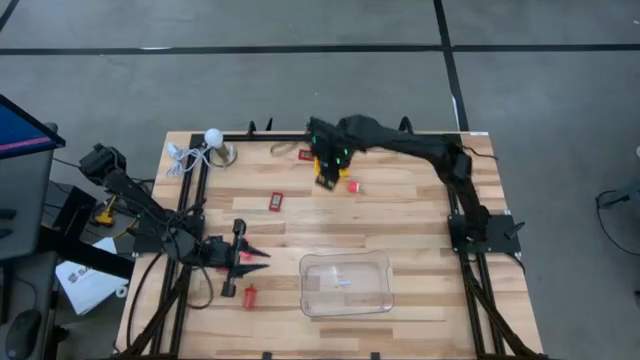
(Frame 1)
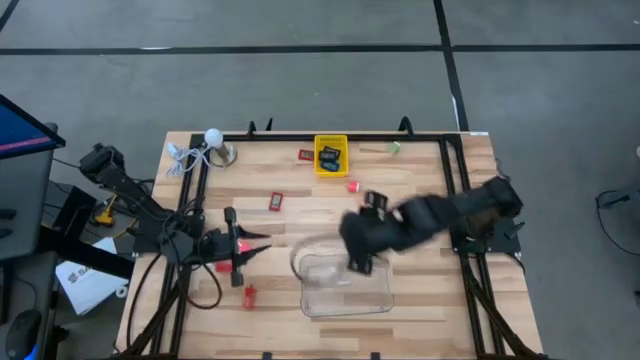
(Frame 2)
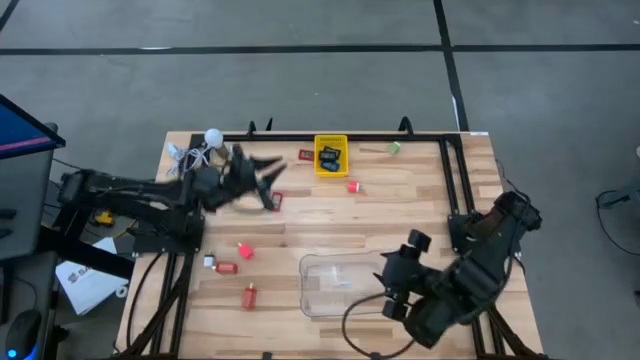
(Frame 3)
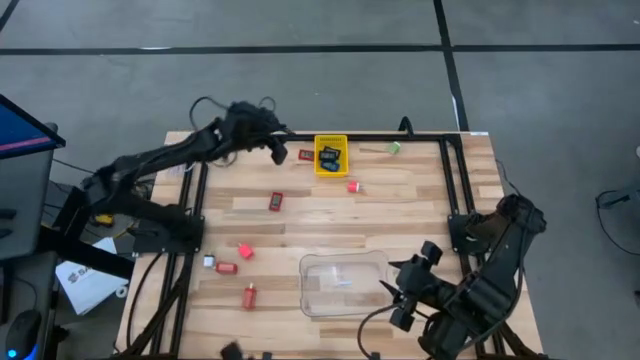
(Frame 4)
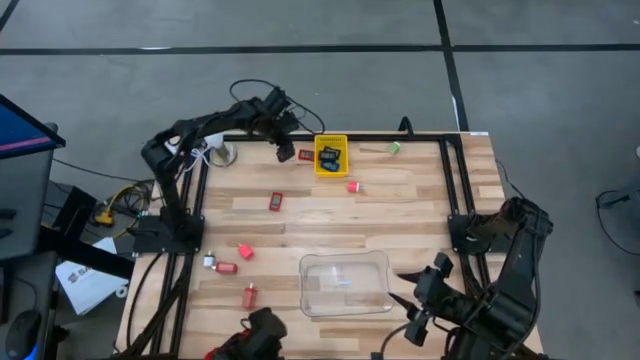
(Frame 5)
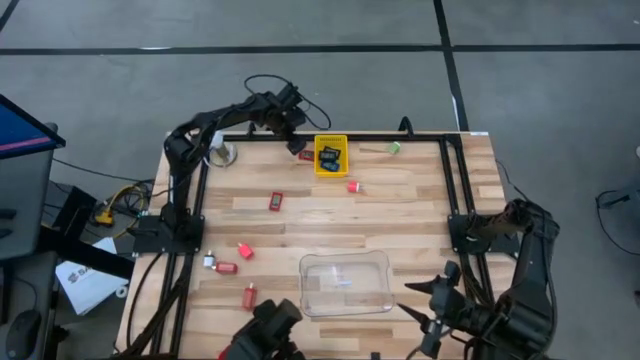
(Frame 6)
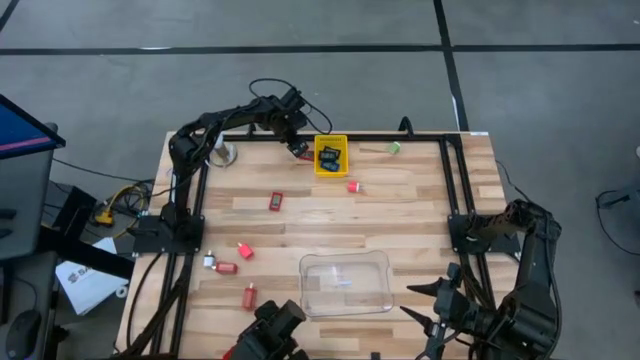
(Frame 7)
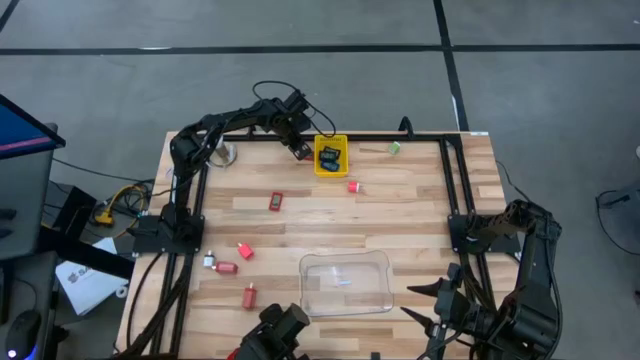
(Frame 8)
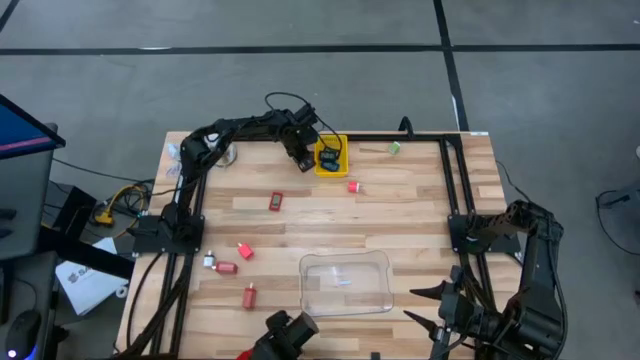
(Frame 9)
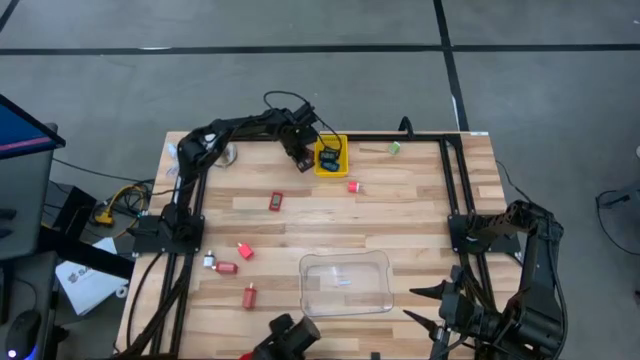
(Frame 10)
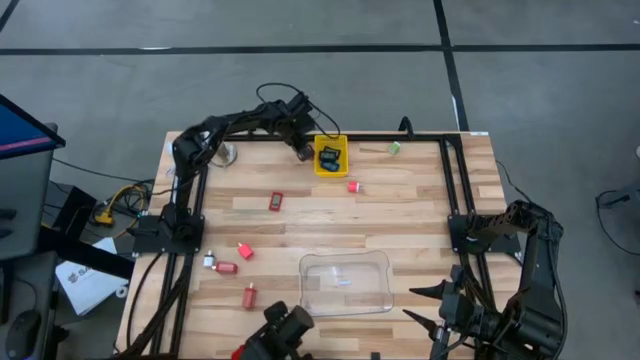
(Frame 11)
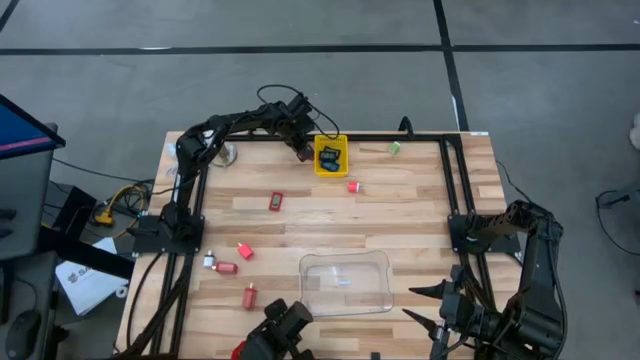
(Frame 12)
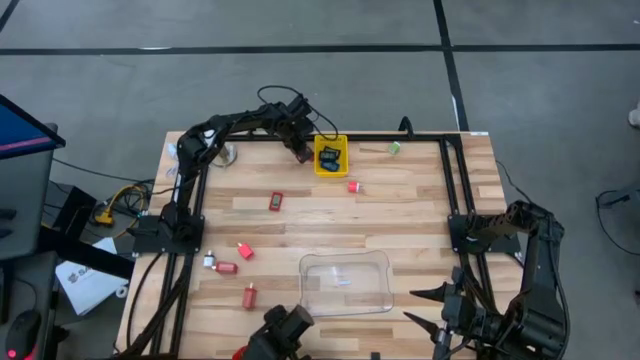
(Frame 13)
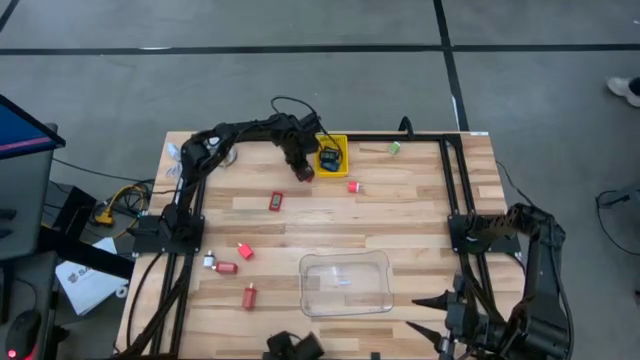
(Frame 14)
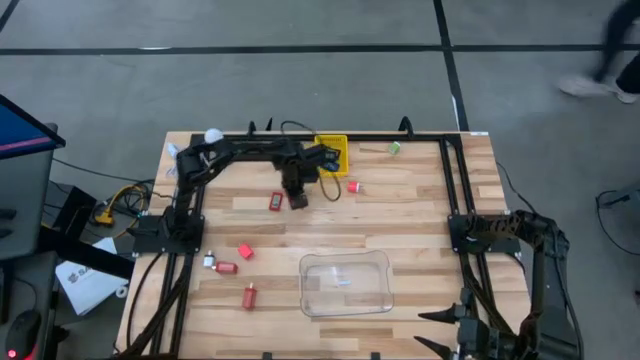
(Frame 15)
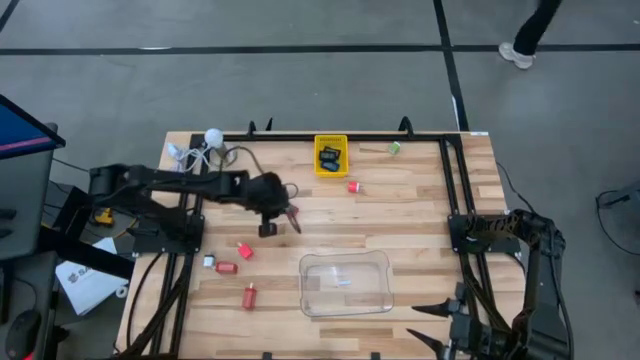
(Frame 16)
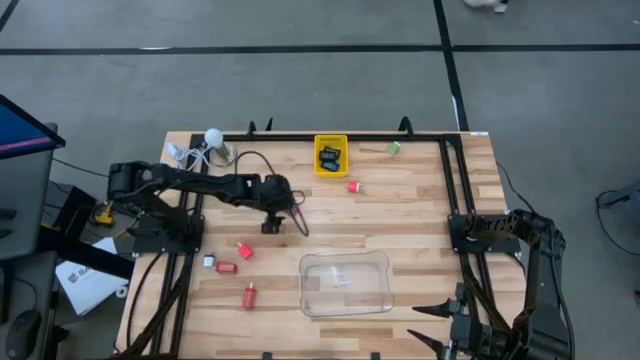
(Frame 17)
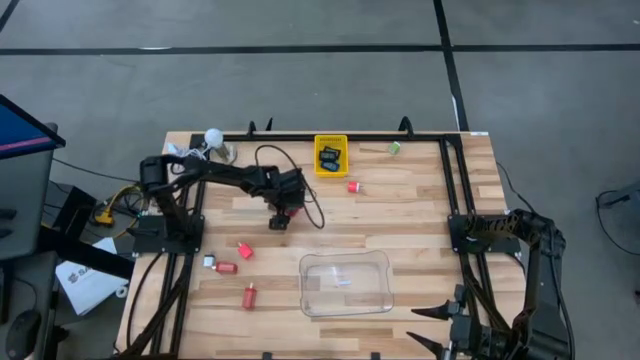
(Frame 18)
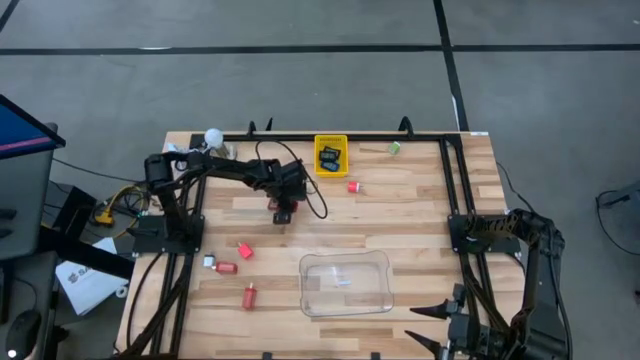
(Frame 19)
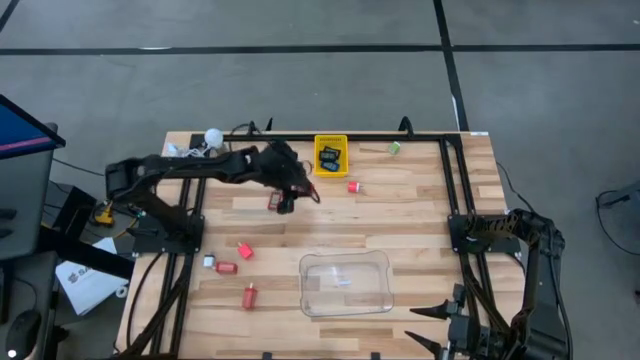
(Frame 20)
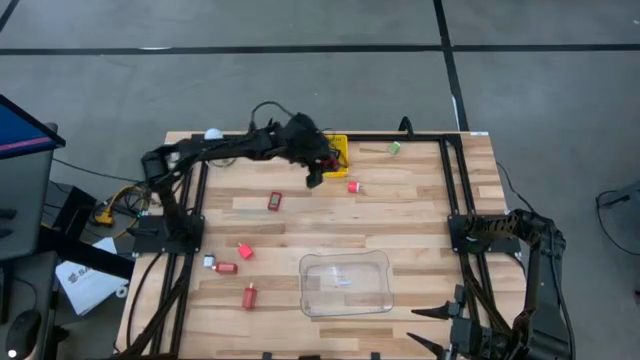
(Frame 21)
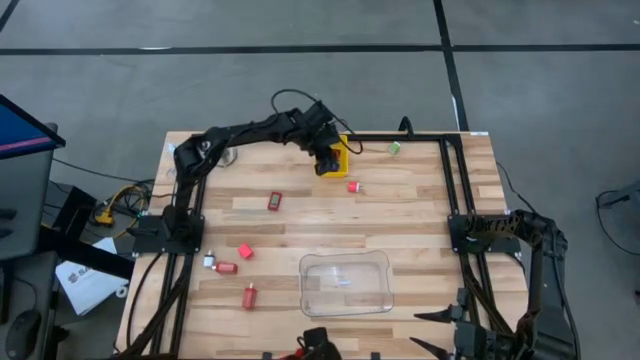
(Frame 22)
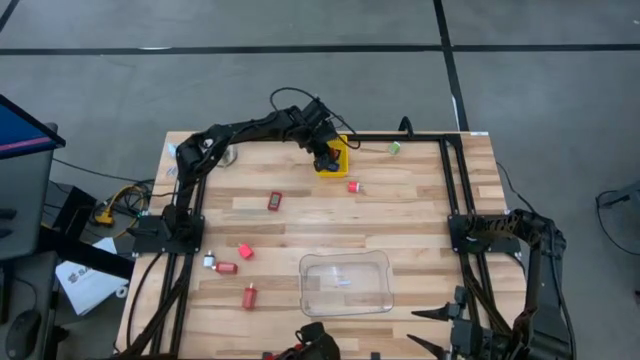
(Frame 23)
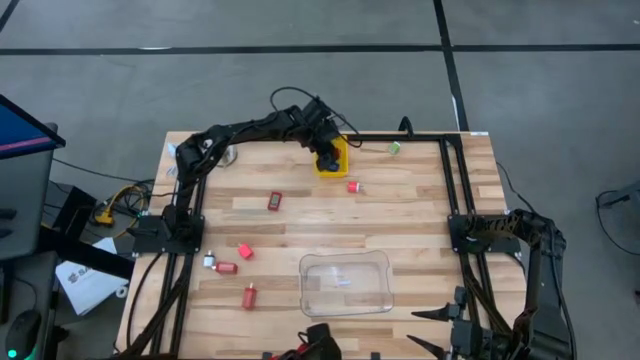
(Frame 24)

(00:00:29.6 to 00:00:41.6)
Task: Pick & Place Office items
Put the red digital clock on the top into the yellow bin

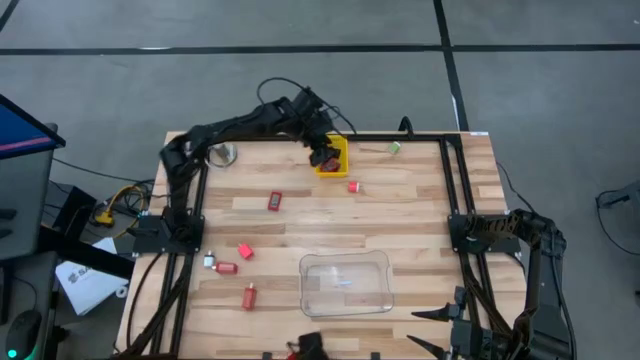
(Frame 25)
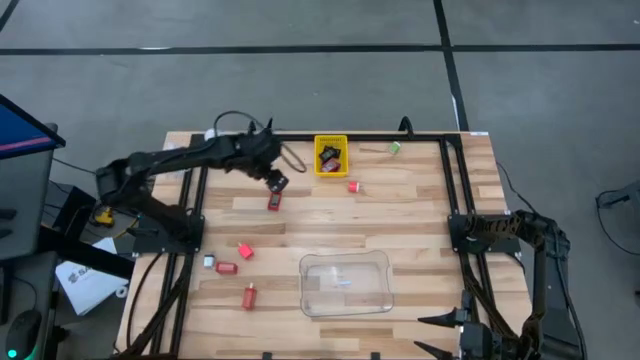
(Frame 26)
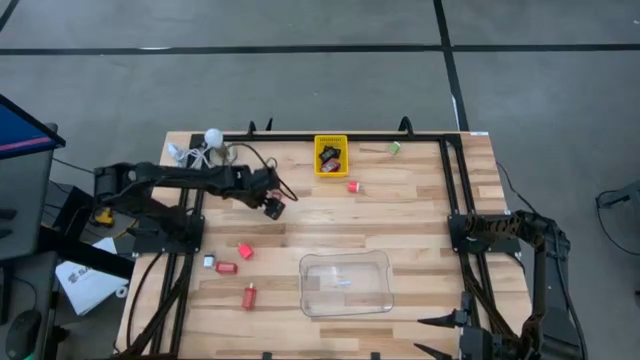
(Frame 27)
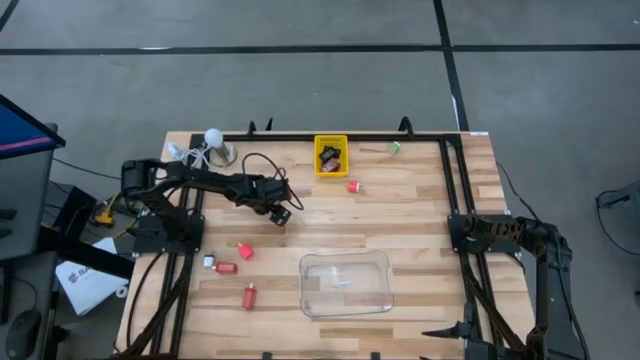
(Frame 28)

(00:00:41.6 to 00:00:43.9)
Put the red digital clock into the yellow bin

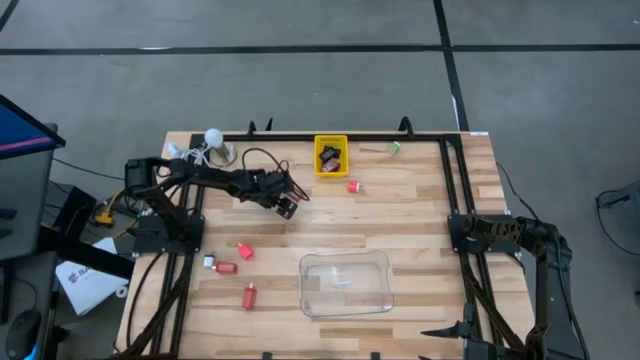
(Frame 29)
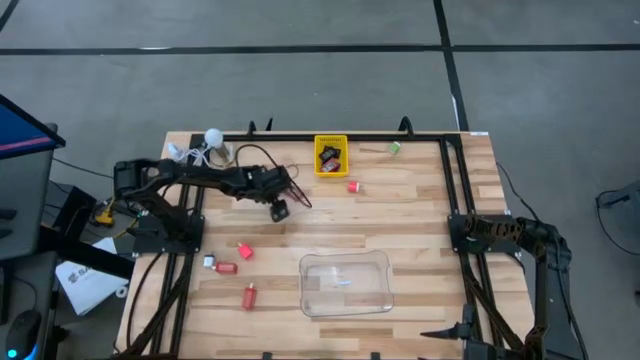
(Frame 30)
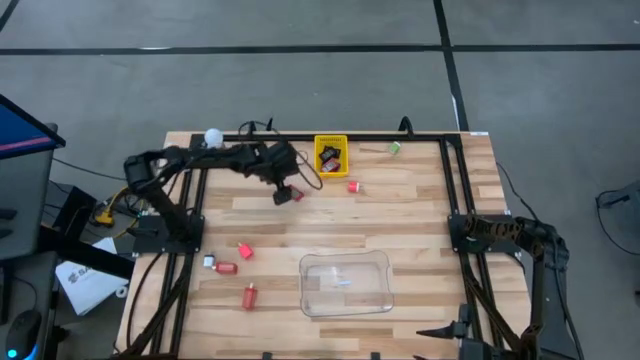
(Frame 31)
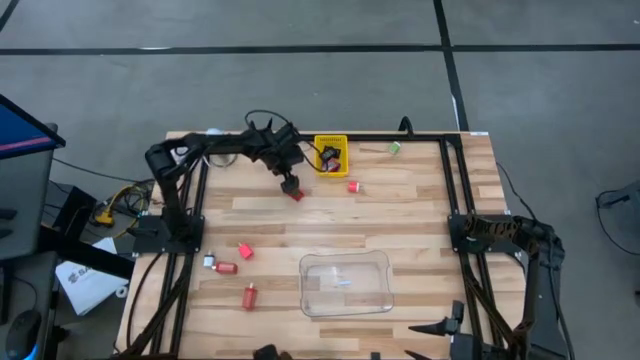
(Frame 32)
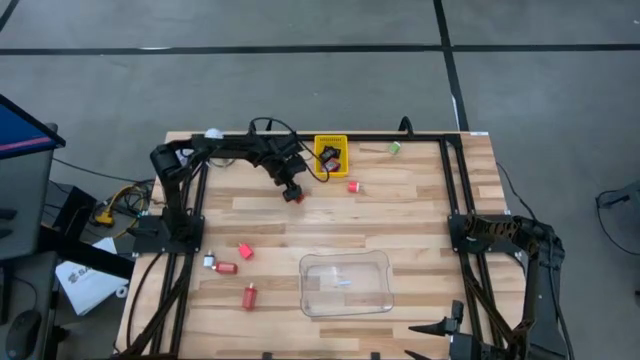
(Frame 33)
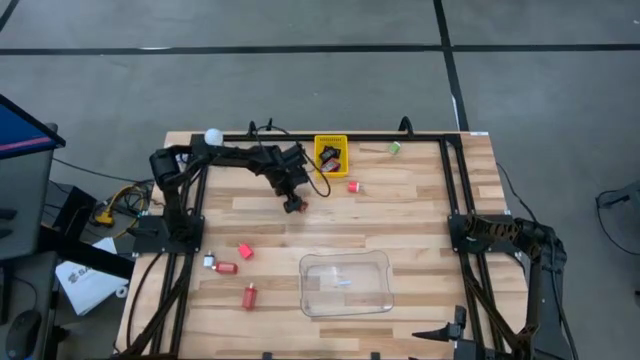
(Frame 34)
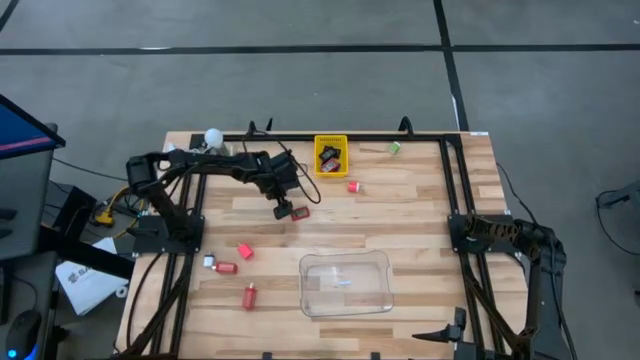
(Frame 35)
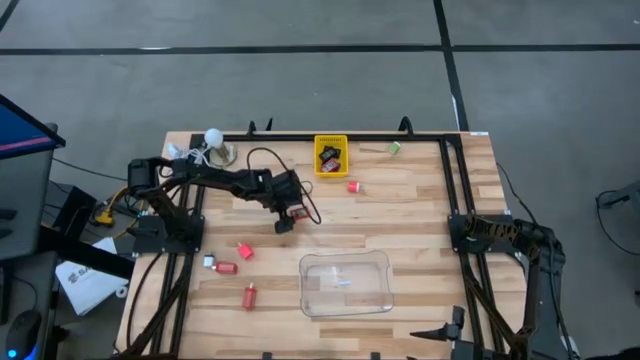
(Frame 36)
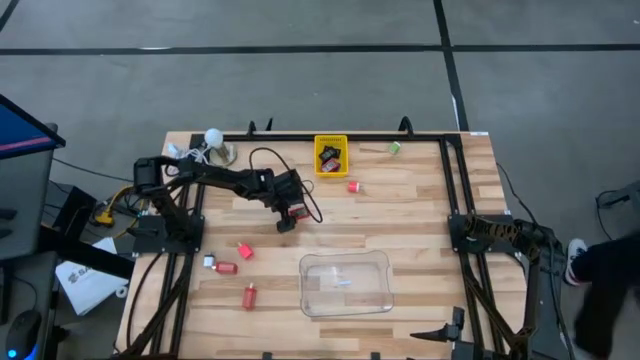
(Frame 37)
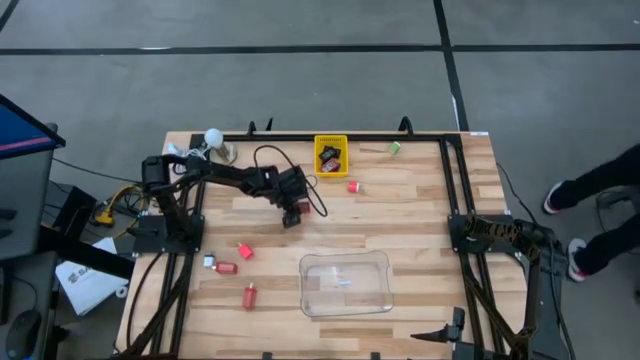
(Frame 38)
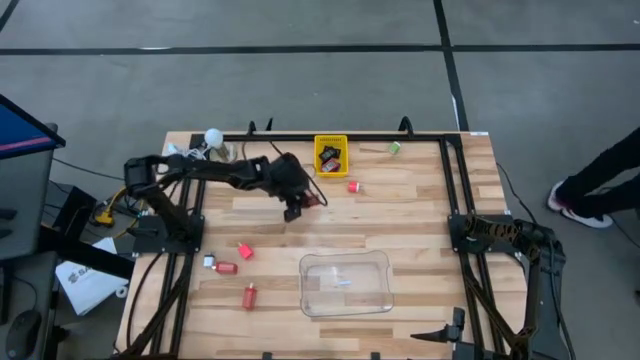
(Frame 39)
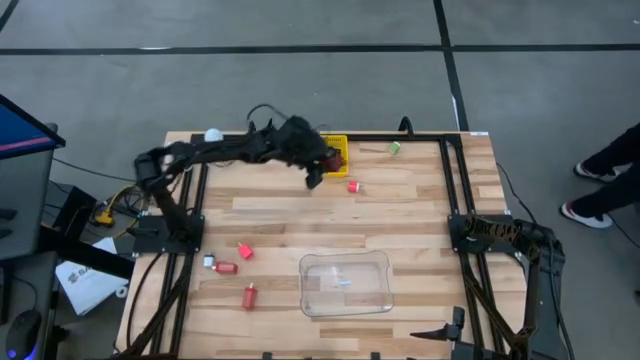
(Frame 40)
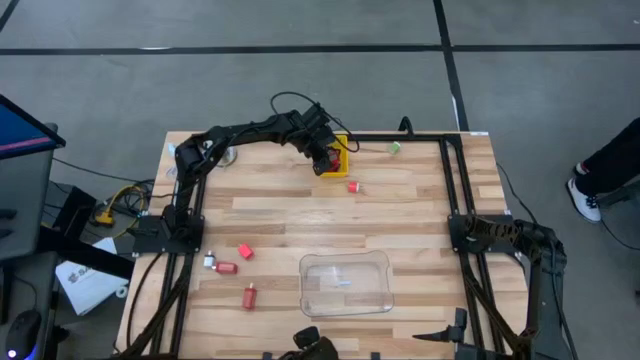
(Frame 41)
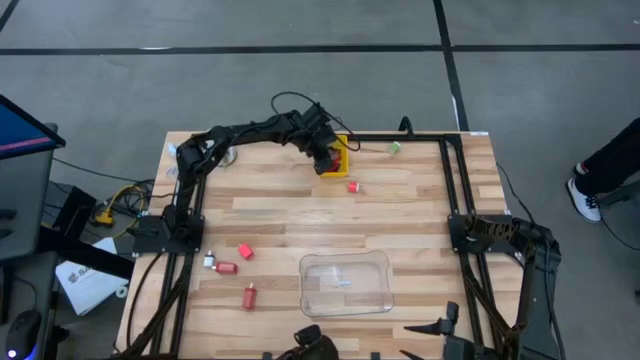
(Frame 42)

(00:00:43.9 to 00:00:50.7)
Put the red digital clock into the yellow bin
